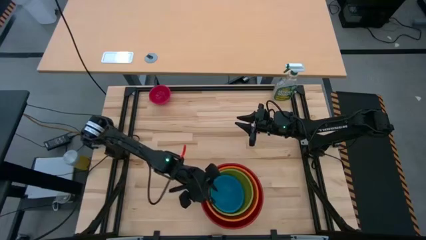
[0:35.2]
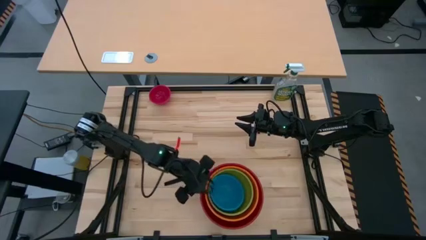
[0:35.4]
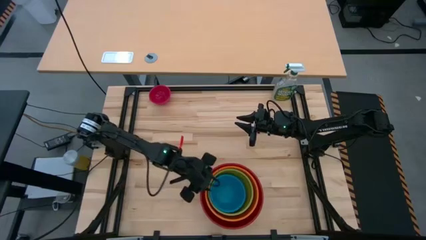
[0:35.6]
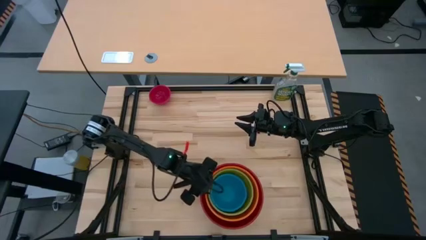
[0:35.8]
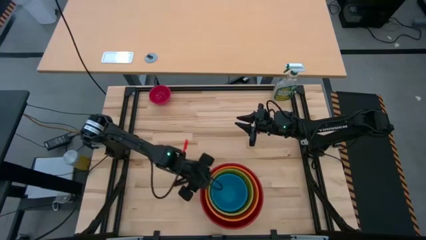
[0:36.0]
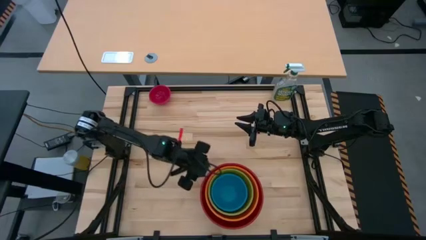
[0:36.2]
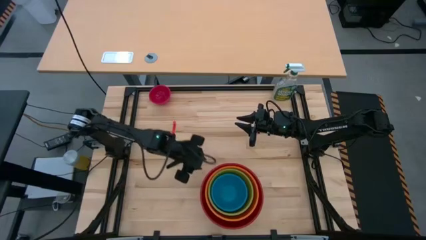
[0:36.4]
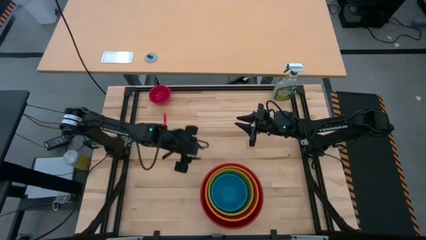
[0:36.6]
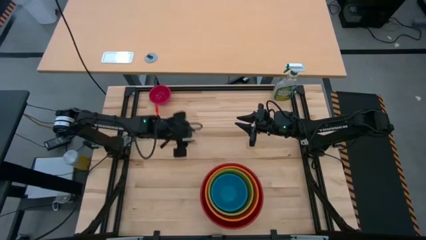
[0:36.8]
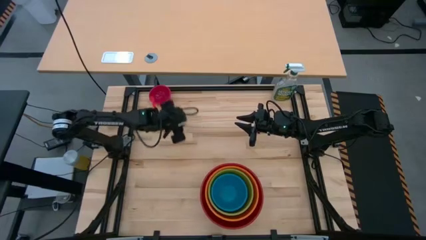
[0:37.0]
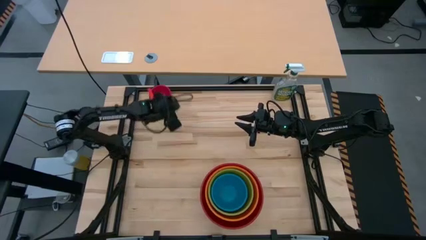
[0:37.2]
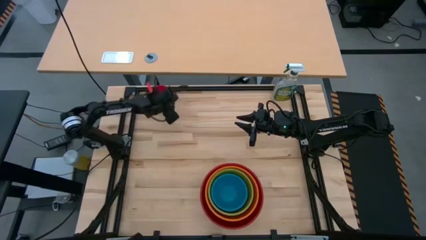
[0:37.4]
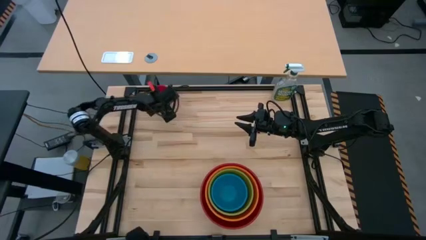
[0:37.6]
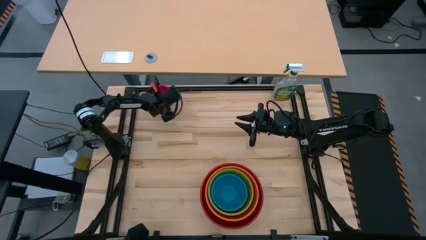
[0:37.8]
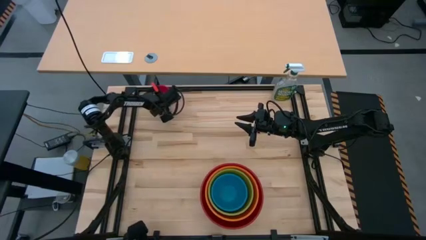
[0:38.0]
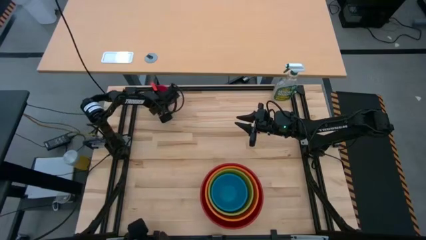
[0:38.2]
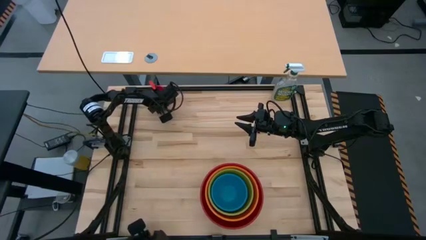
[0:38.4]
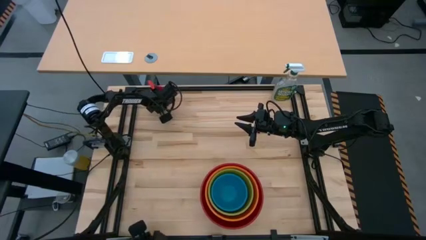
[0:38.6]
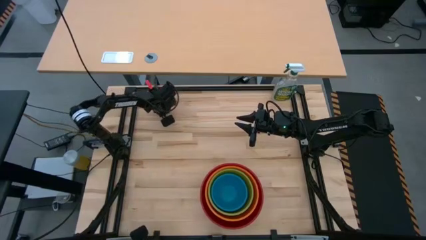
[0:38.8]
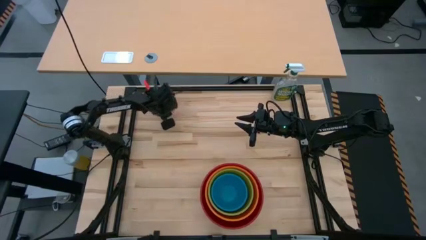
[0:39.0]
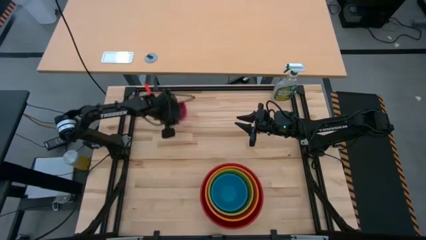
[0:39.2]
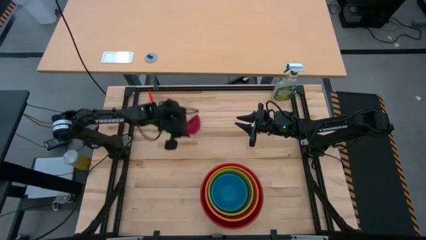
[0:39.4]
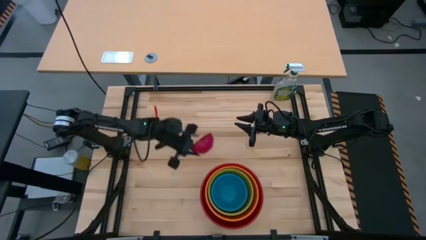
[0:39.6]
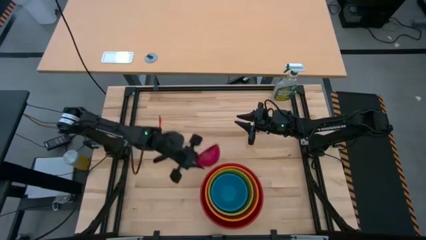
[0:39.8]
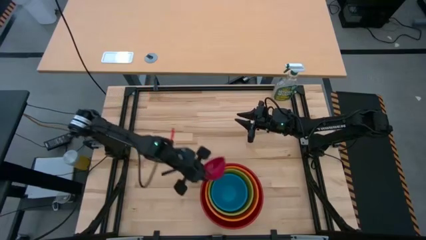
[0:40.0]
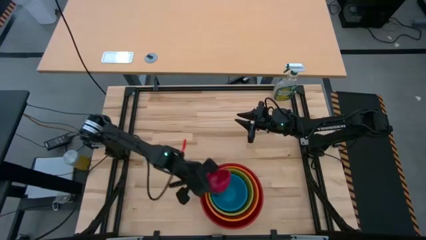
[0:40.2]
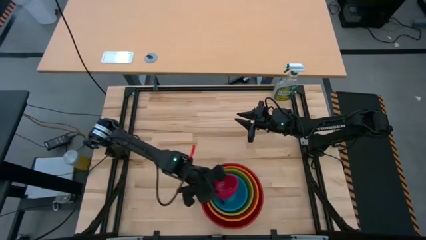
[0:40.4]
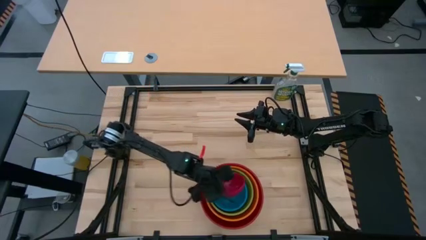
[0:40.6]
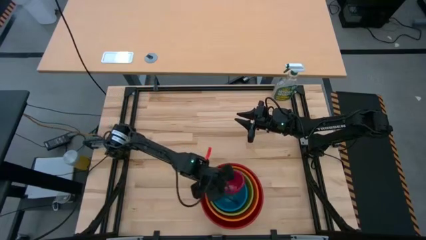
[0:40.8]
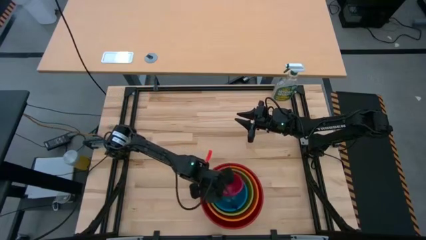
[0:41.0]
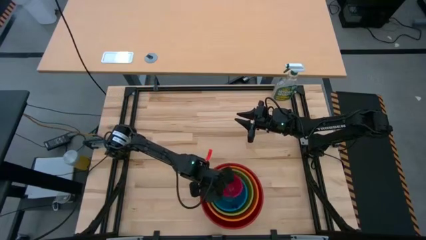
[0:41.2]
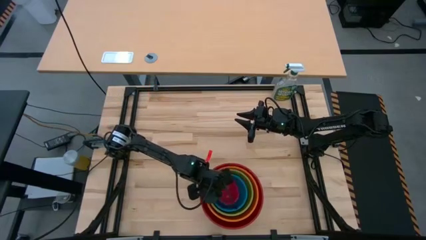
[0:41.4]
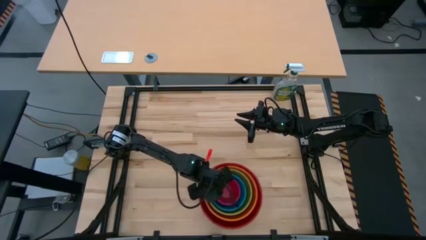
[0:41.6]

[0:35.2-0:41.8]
Stack the red bowl on the blue bowl

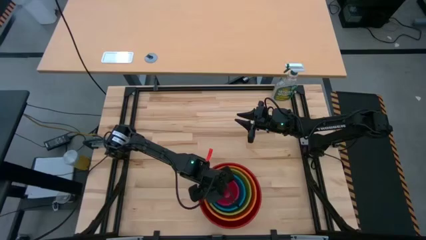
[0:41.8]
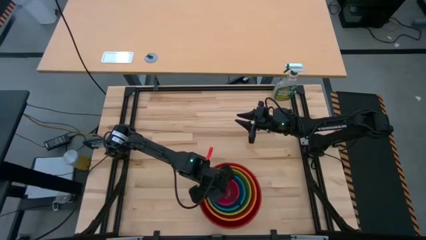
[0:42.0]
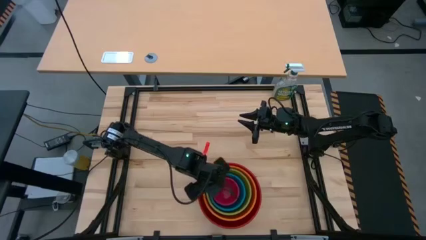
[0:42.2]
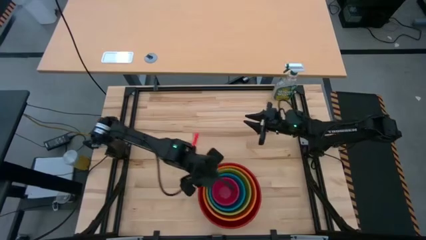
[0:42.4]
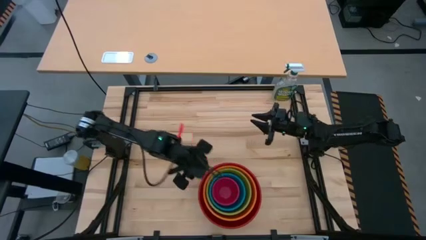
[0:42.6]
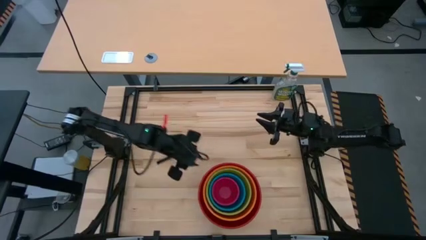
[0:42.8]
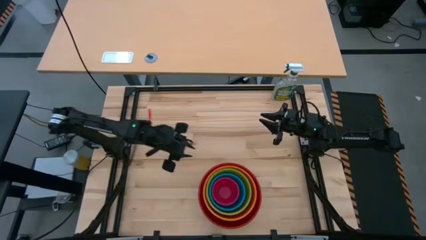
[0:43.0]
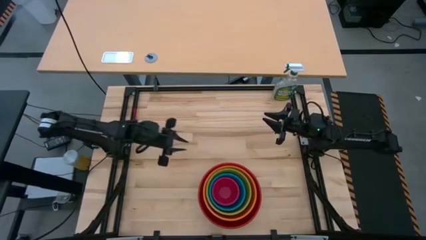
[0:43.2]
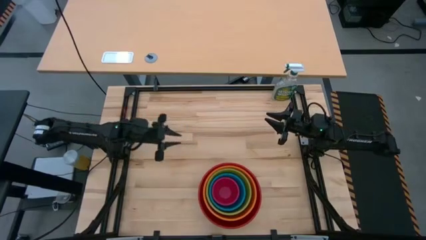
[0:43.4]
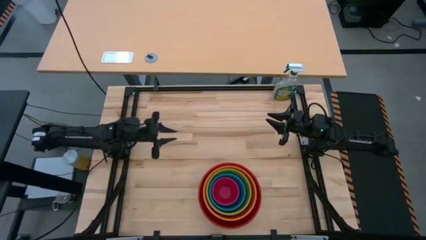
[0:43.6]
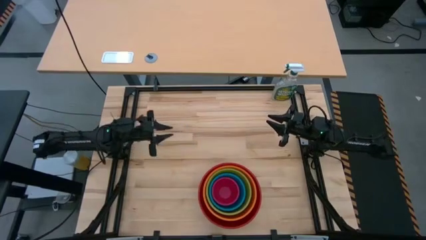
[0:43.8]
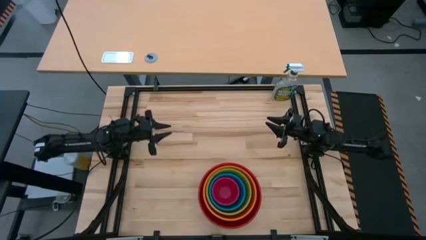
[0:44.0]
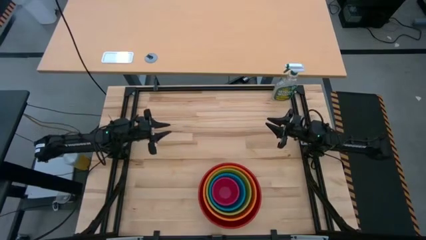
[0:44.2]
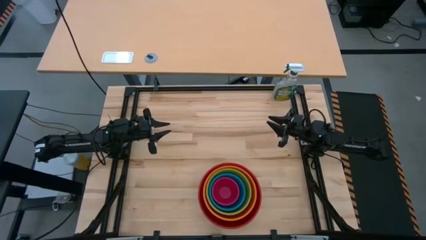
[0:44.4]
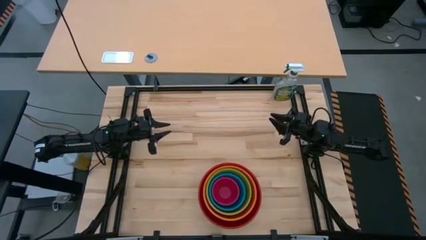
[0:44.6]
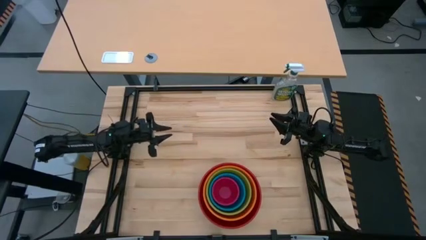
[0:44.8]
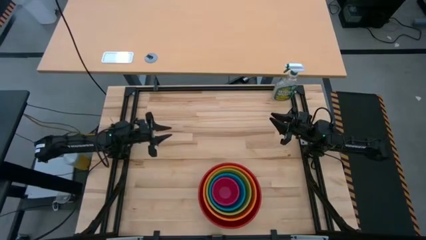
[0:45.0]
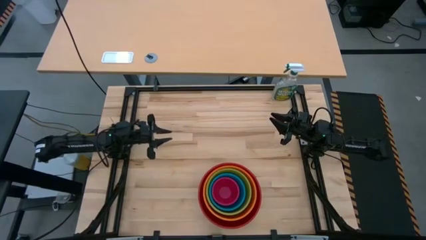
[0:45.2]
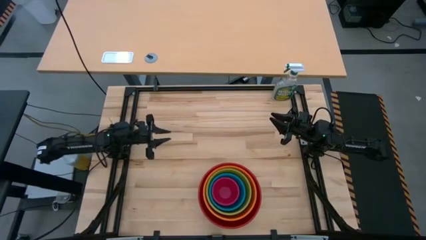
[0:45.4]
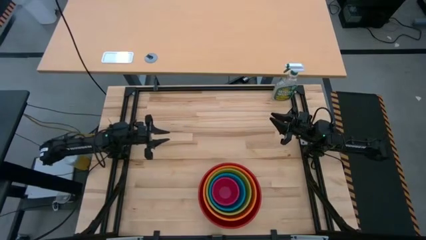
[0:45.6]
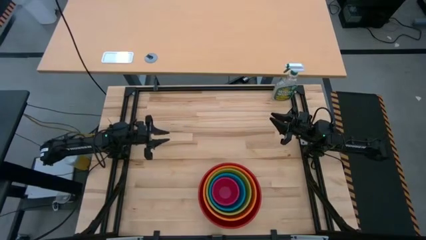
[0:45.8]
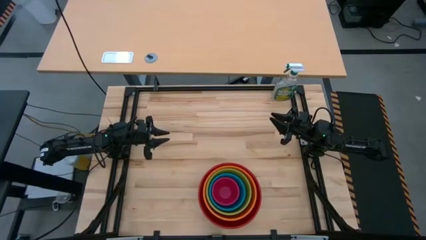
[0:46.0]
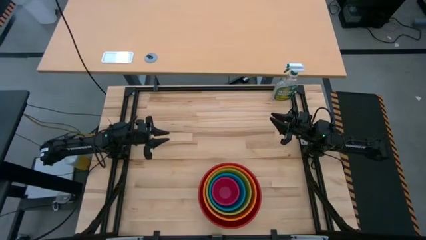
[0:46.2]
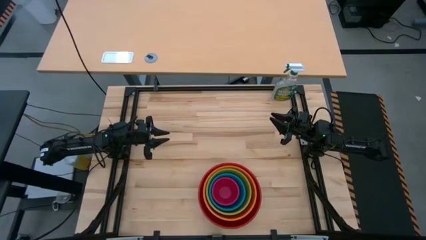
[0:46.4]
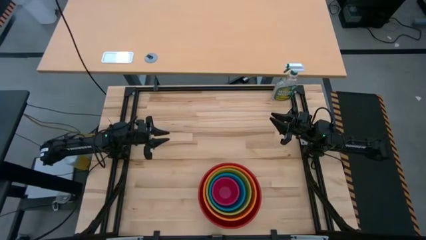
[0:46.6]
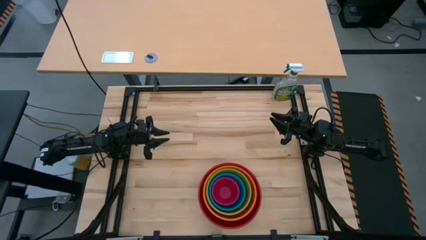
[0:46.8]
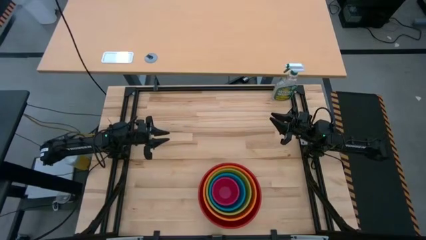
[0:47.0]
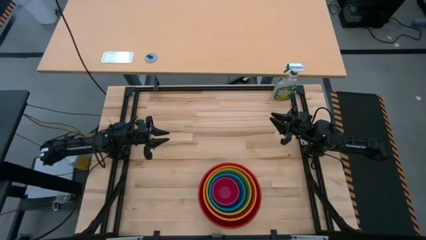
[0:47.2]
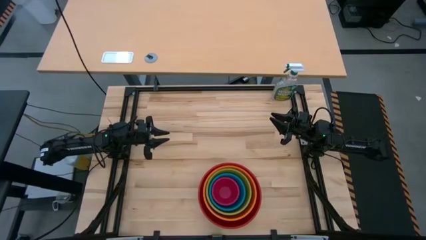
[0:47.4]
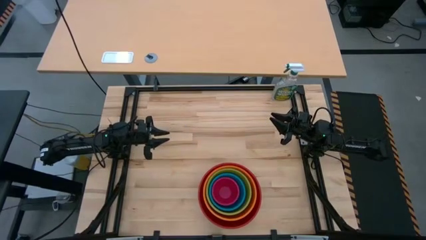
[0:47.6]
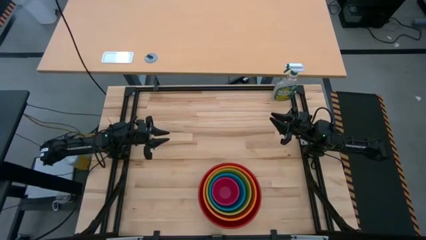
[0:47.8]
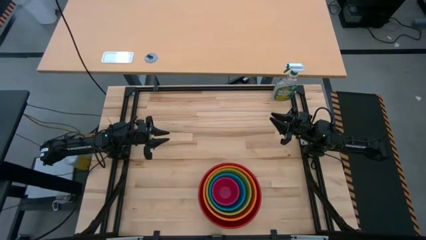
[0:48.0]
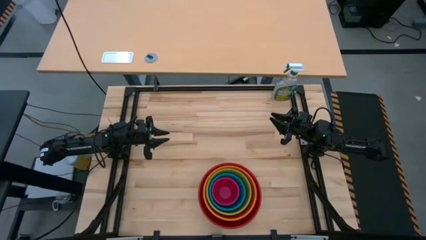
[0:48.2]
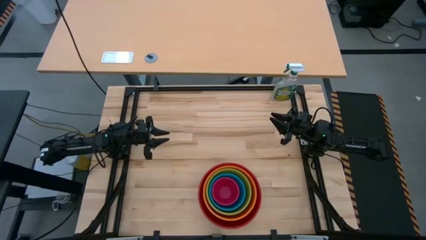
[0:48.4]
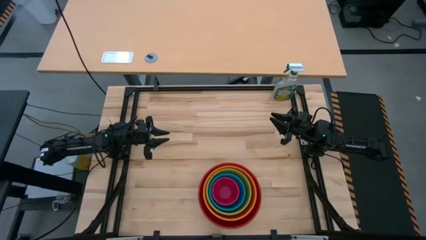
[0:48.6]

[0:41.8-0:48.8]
Return to Home Position
